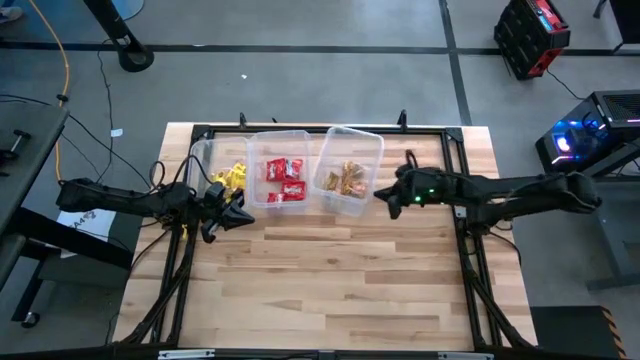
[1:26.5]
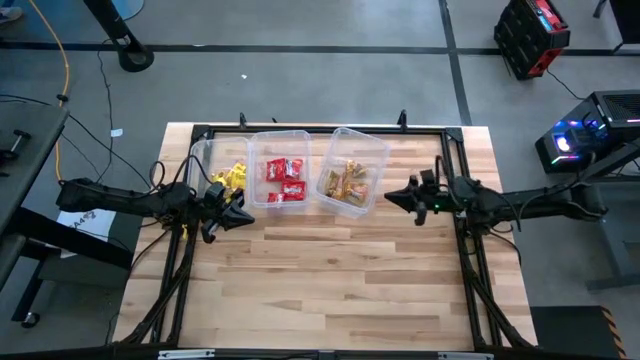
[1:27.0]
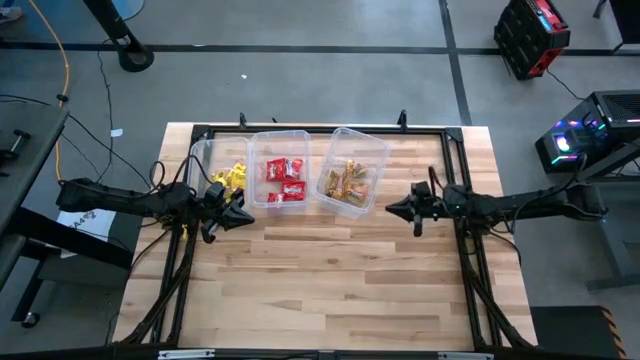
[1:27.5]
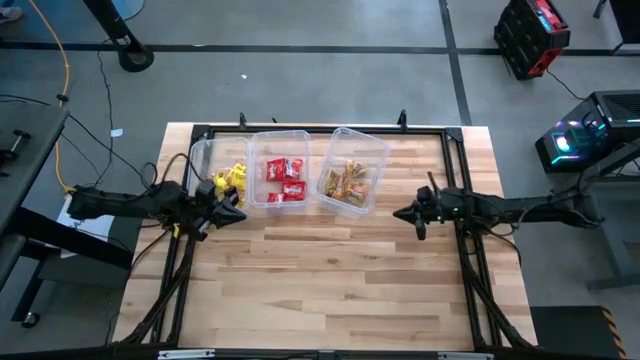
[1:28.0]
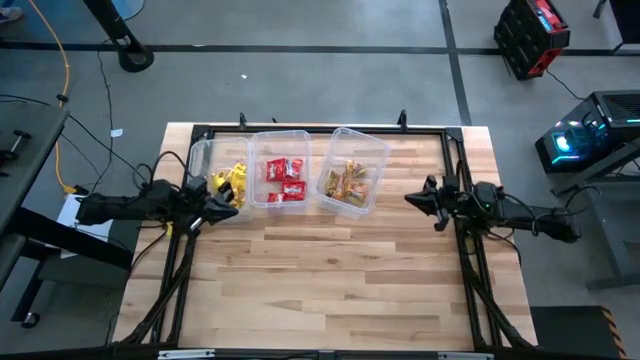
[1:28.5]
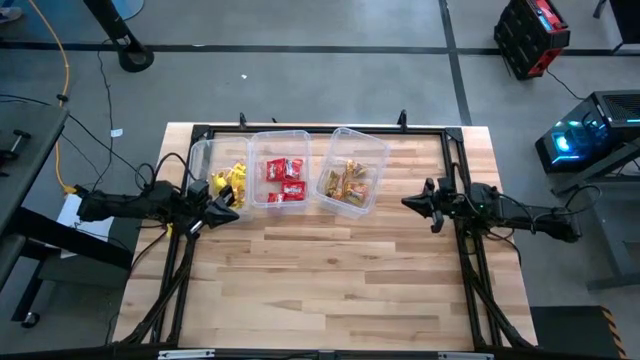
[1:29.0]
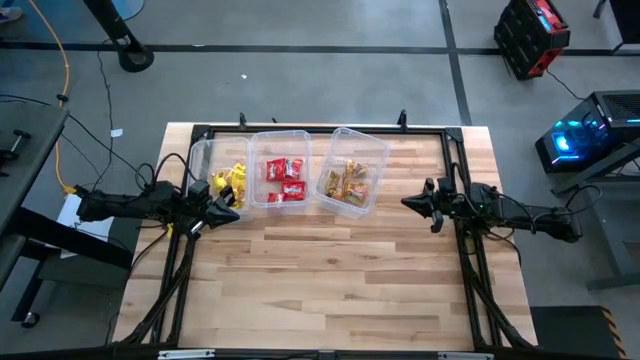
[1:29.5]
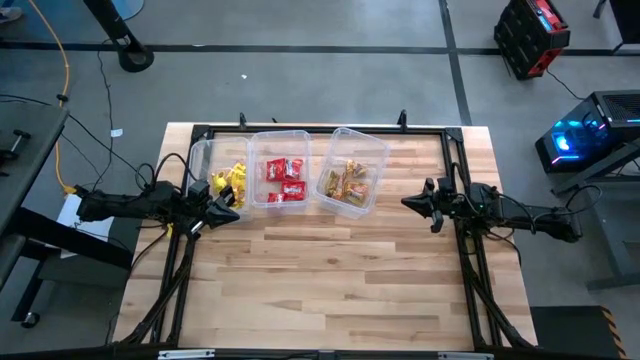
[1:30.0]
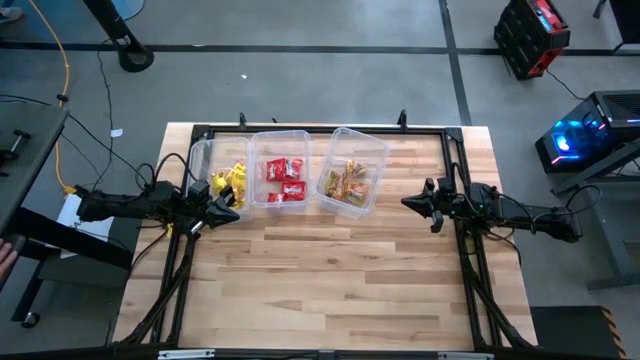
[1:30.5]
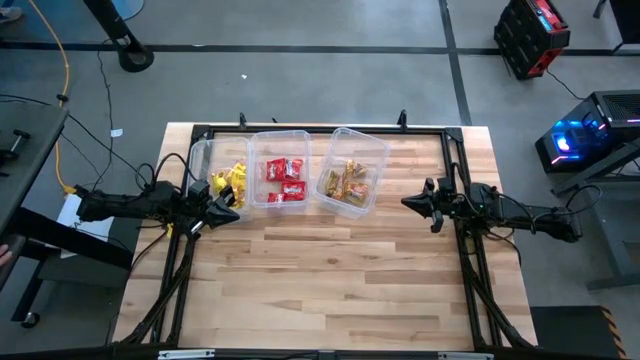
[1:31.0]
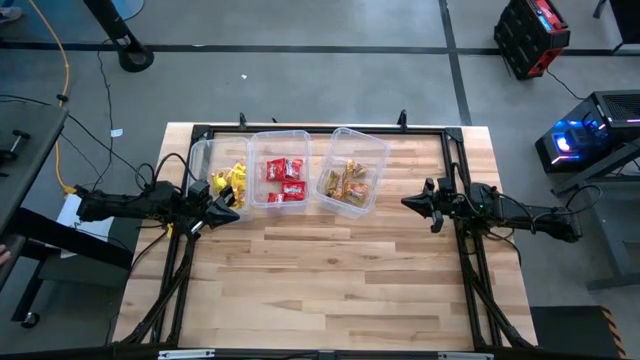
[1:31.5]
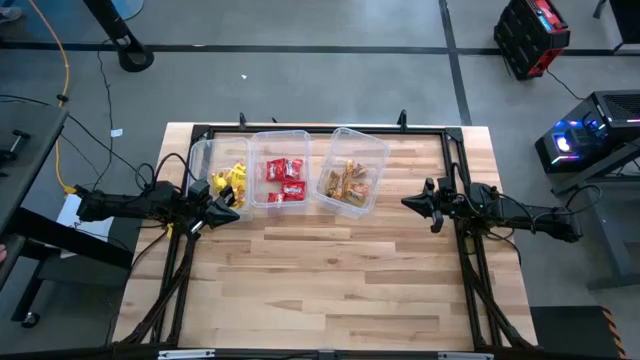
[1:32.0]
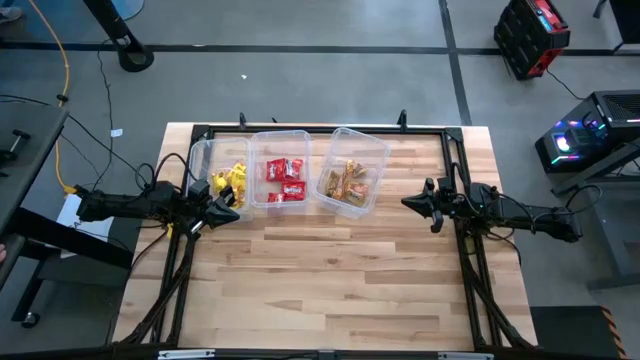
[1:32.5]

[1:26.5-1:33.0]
Task: Sort candy
Return to Home Position

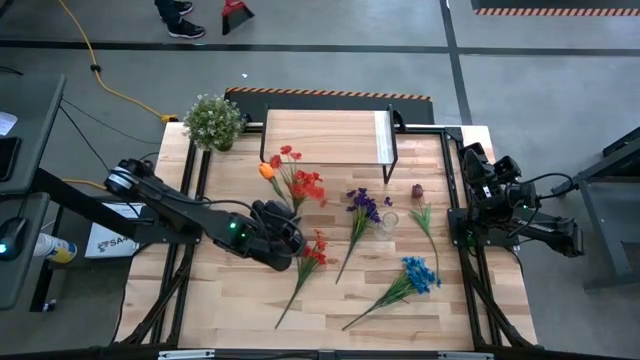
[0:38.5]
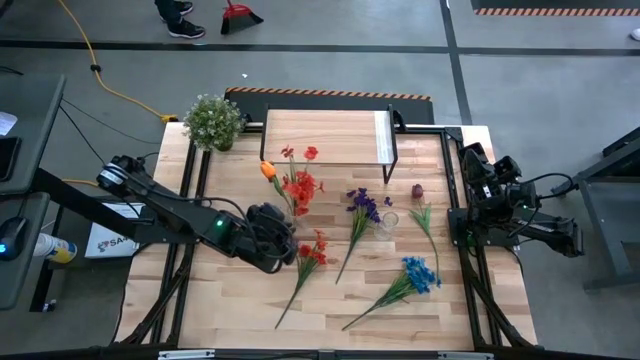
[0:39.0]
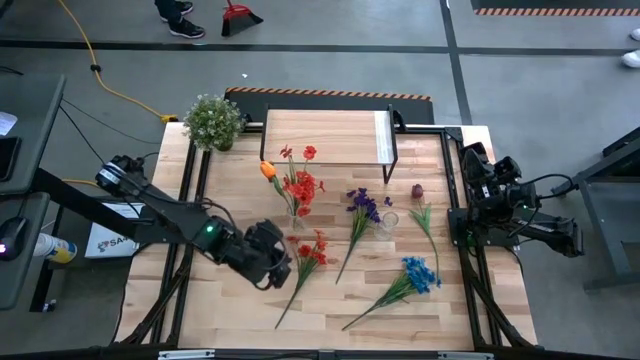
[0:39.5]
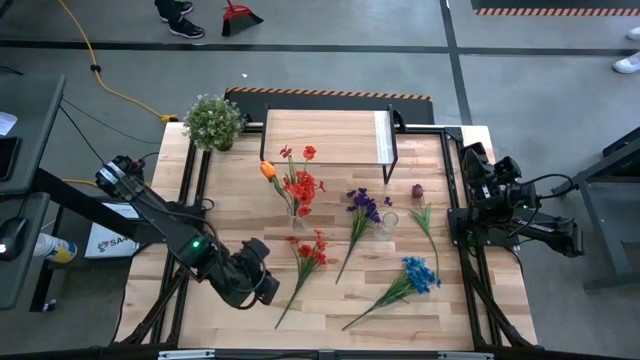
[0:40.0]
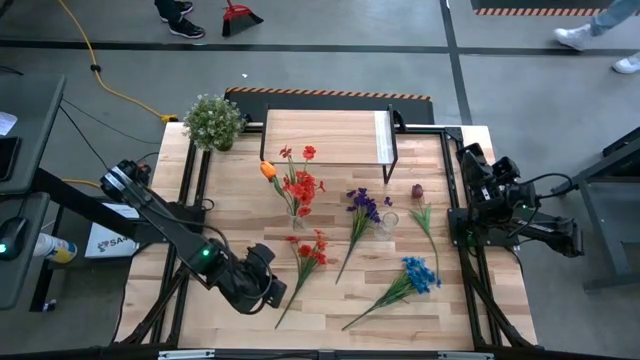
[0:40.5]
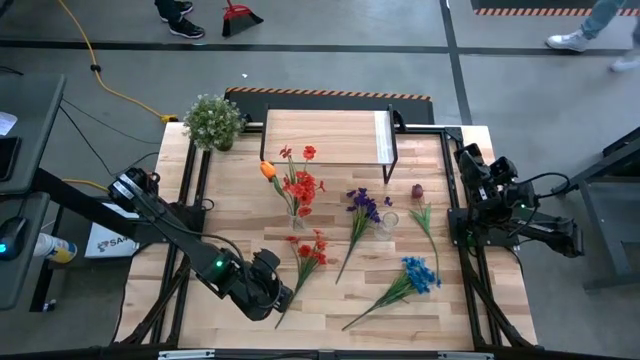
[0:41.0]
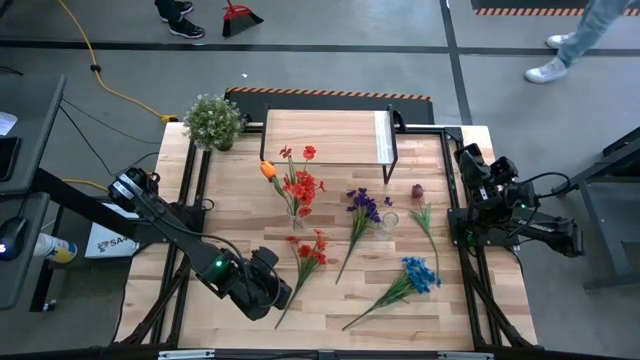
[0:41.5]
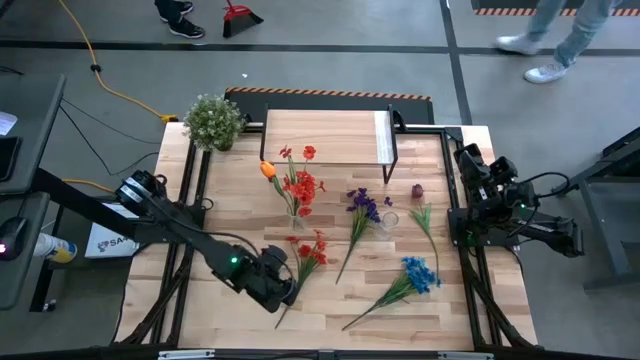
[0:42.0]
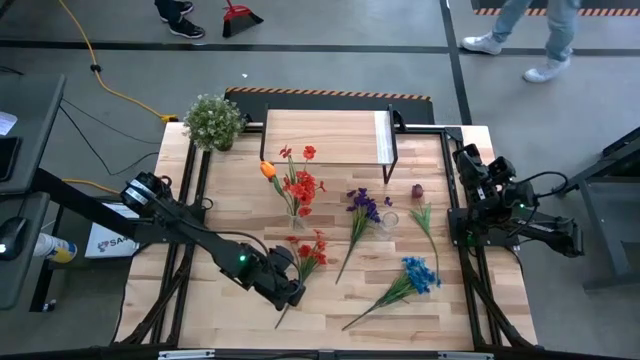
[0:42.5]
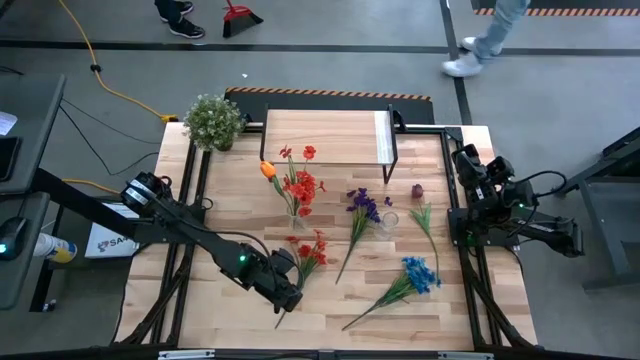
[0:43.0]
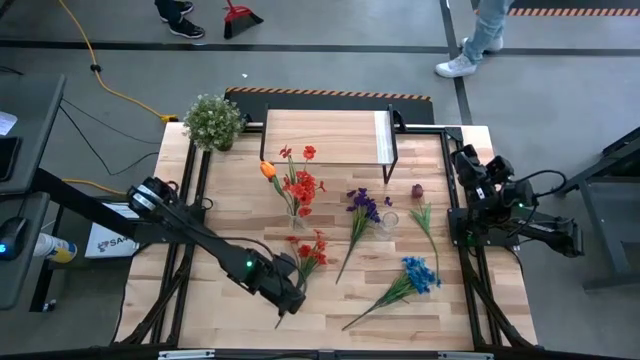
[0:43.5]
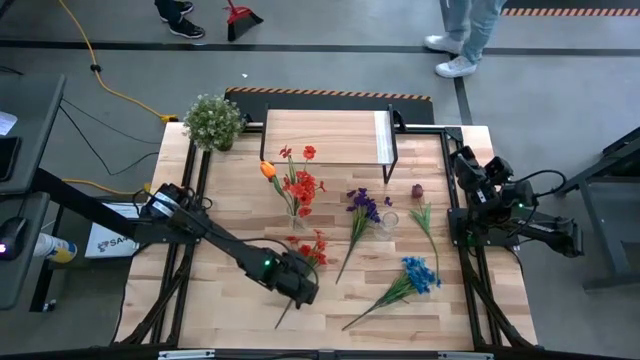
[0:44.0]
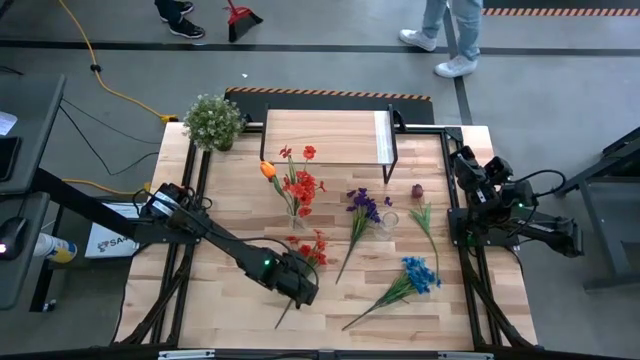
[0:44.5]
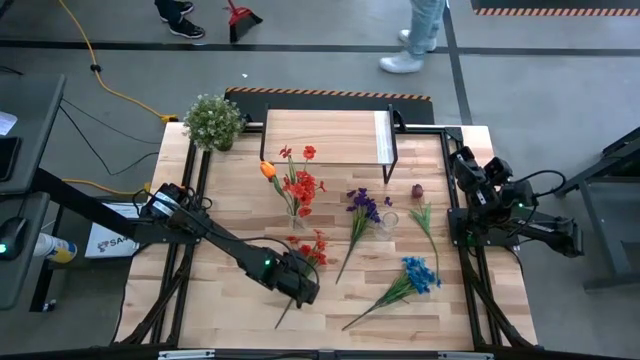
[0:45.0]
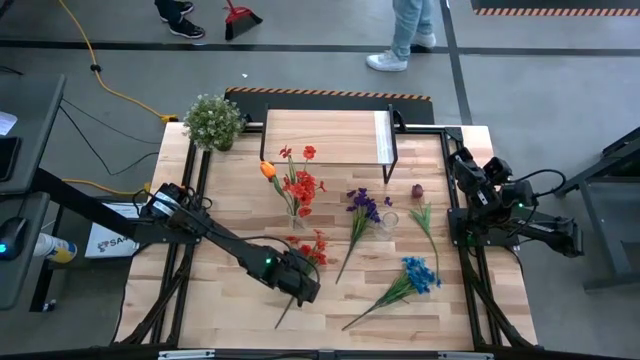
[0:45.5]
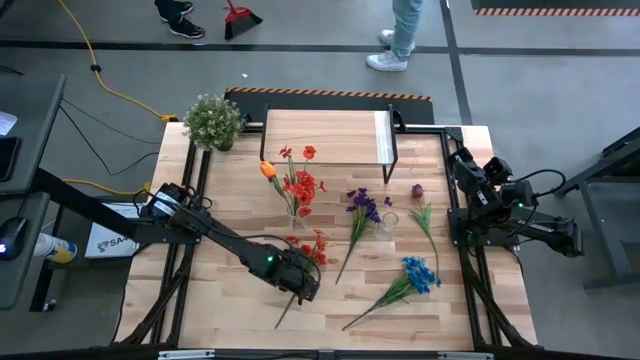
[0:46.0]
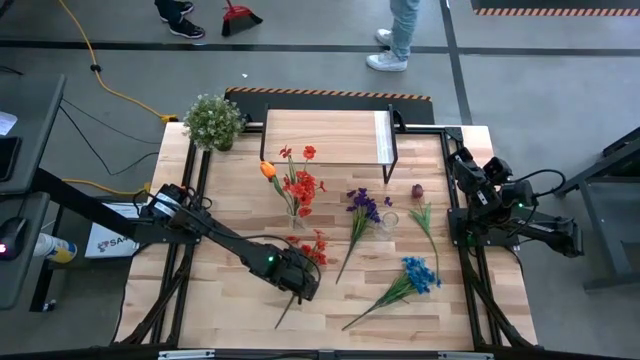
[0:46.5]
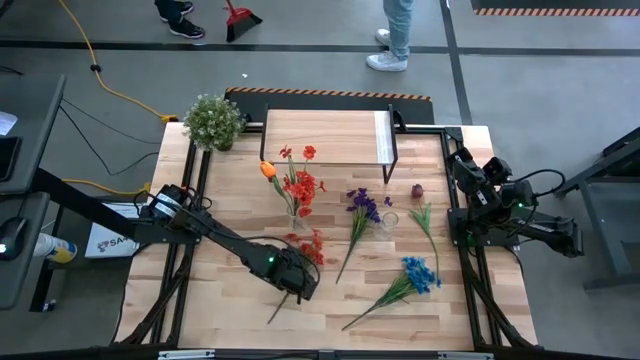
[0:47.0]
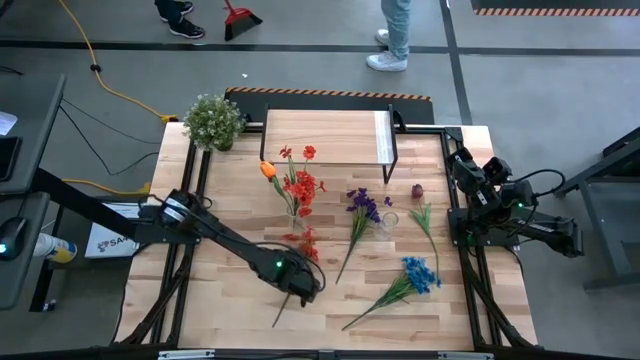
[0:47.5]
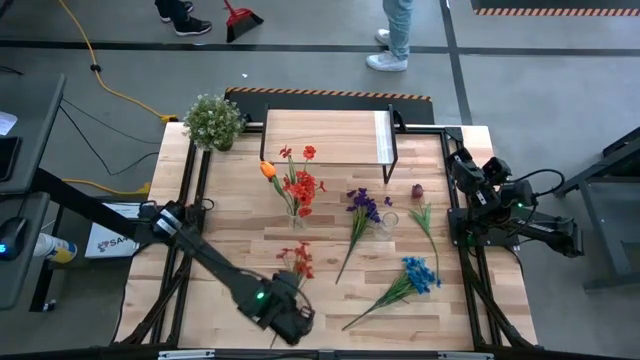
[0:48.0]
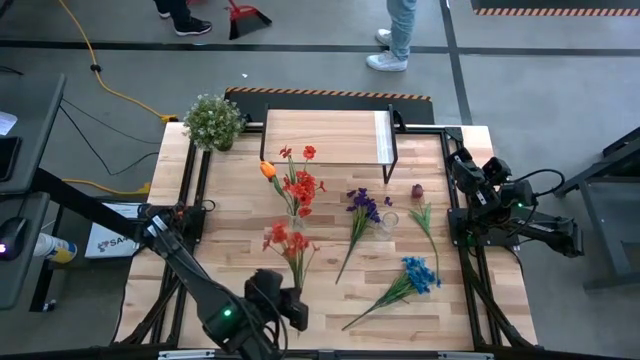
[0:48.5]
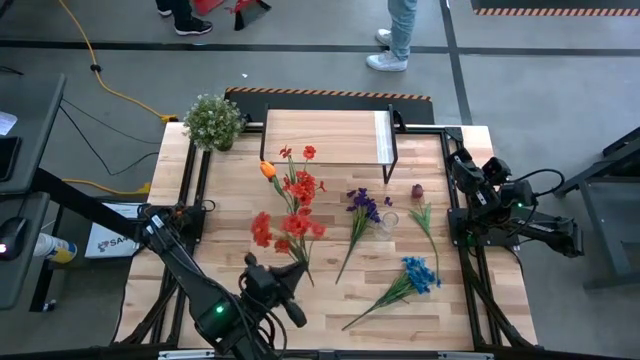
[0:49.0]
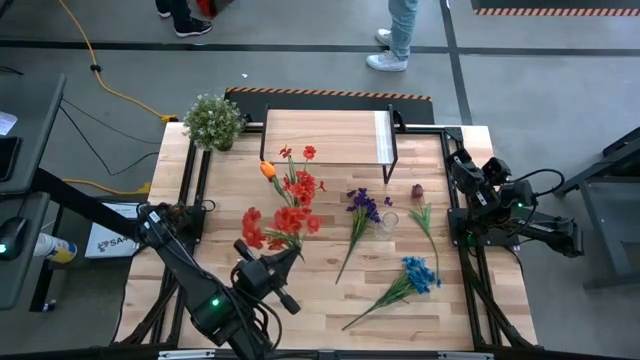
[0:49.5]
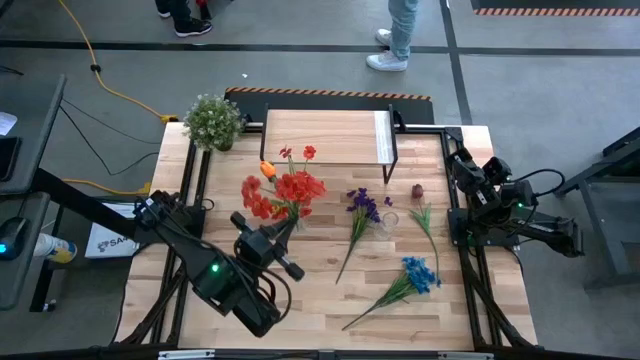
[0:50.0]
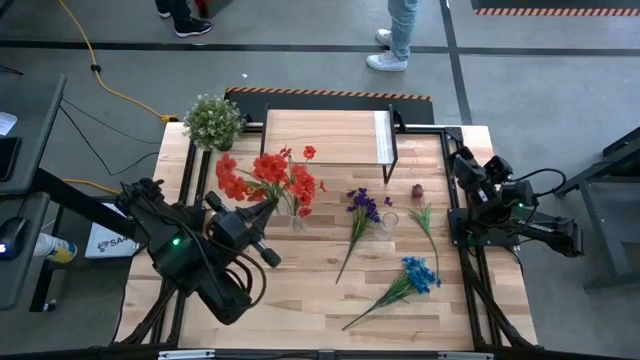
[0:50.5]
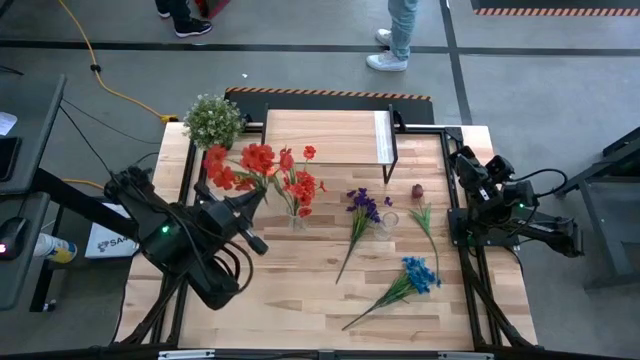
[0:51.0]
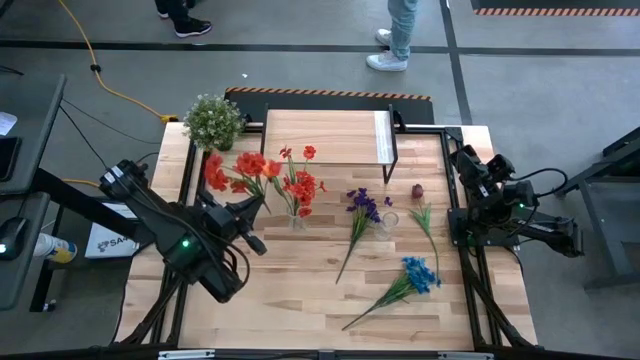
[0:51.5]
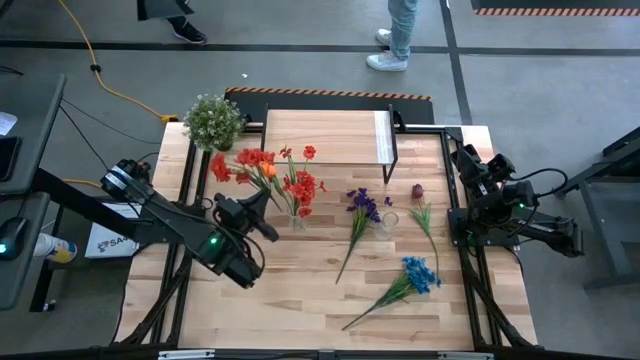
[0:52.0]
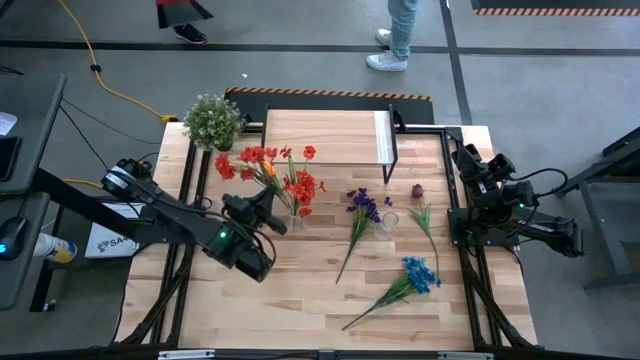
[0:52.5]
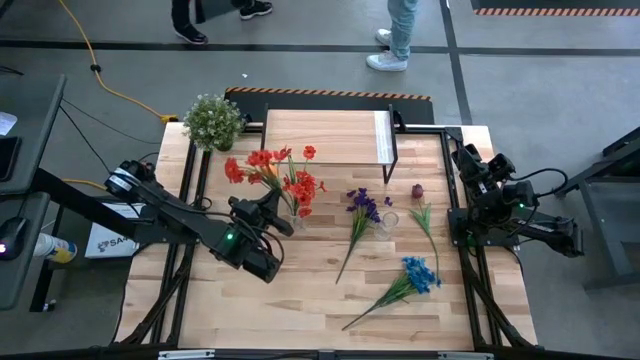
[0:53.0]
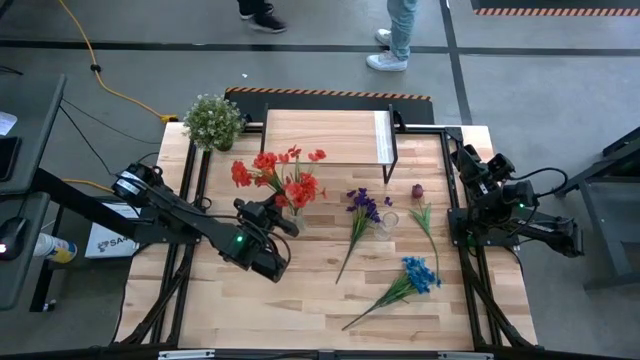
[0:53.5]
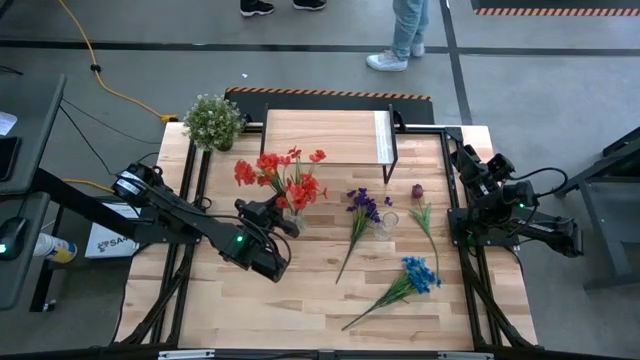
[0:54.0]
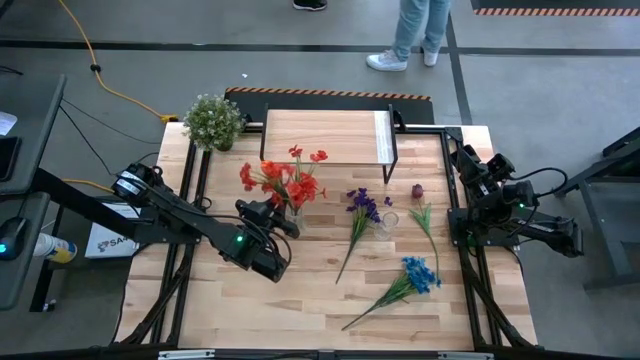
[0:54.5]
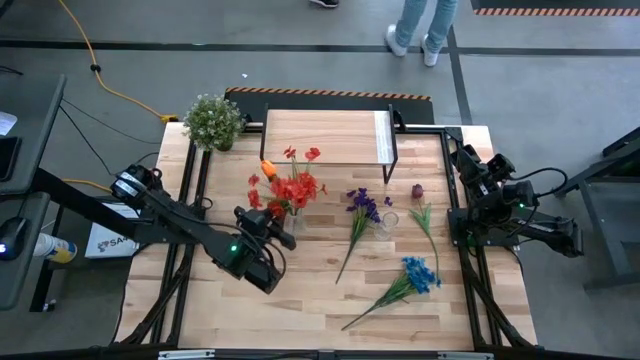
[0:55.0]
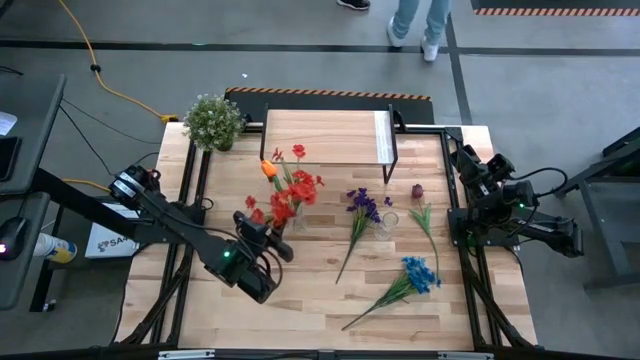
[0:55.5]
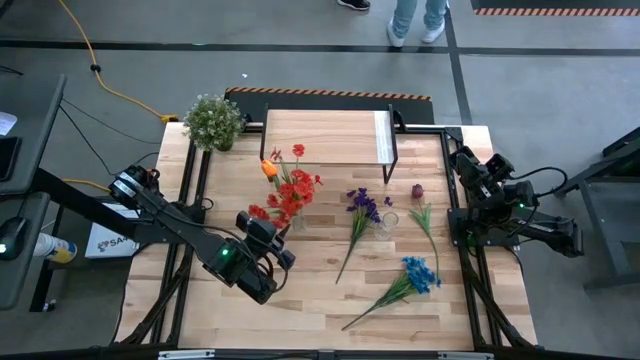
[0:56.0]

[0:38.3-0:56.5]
Task: Pick and place flowers into a vace then onto a shelf
Put the orange flowers into the left transparent vase
